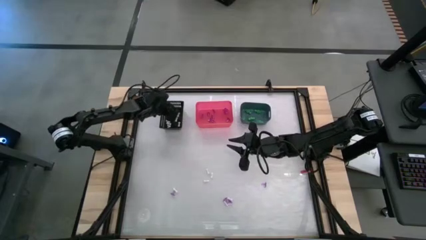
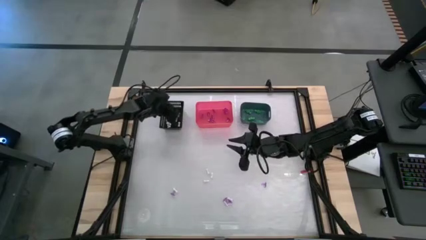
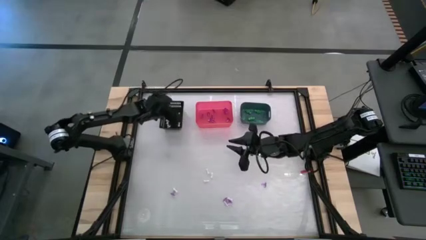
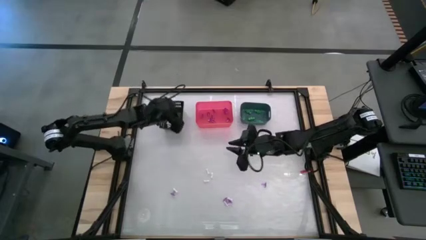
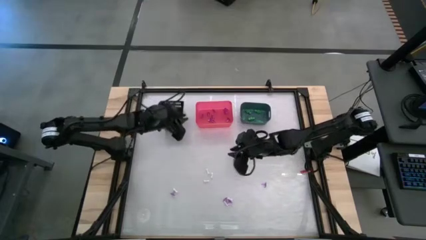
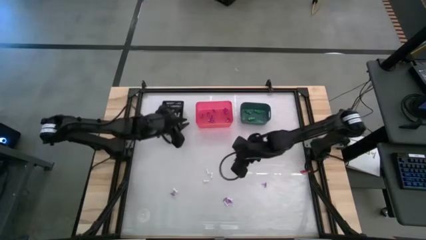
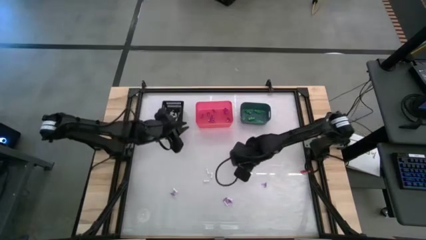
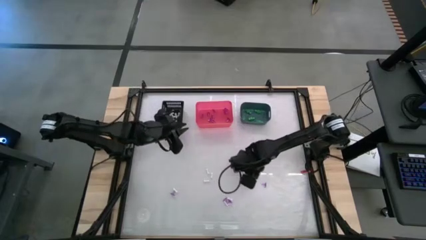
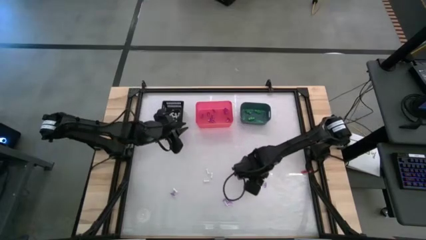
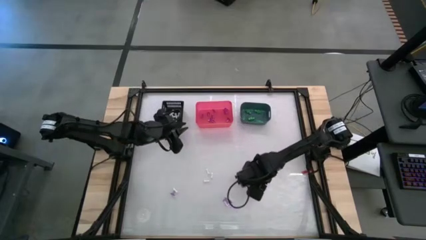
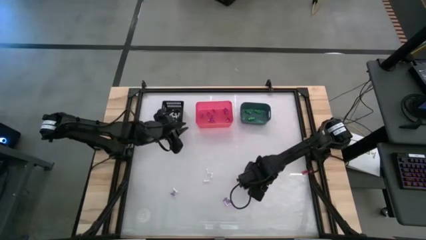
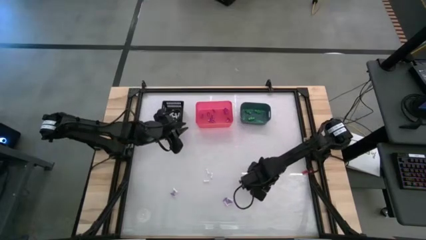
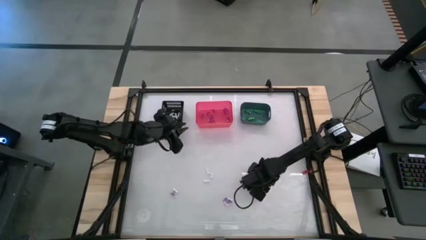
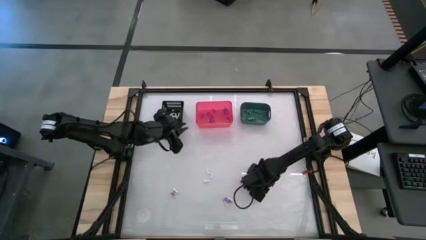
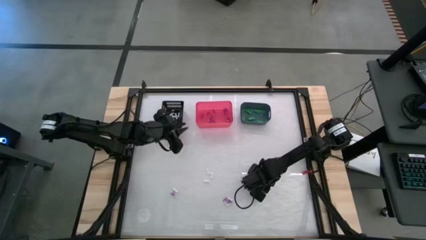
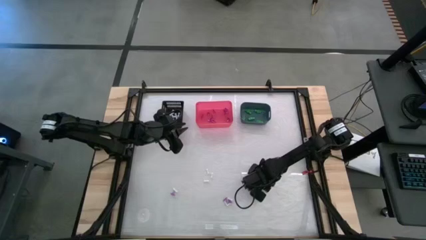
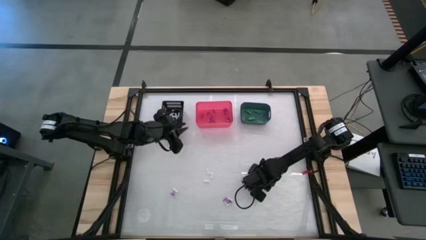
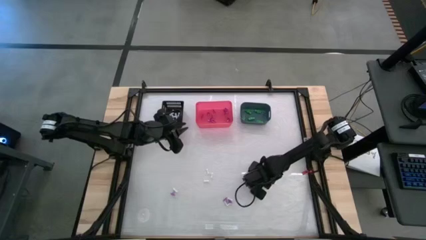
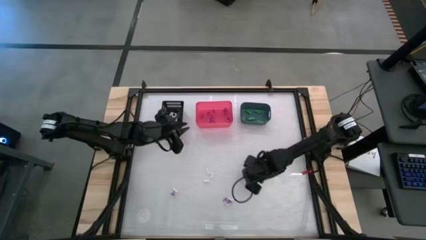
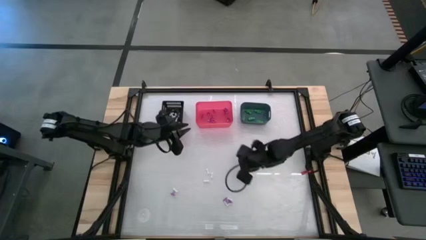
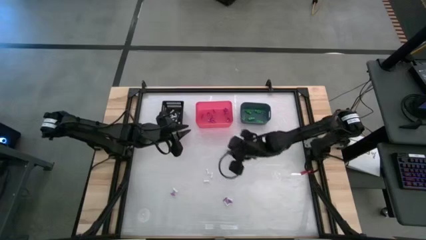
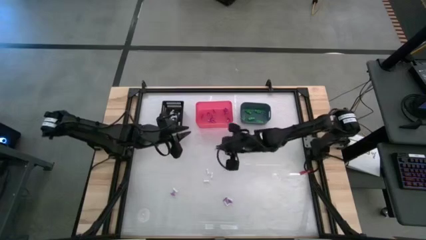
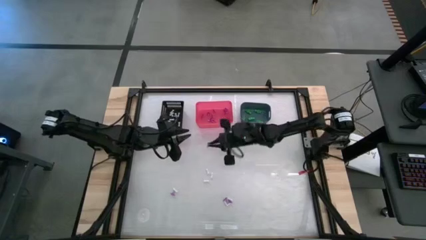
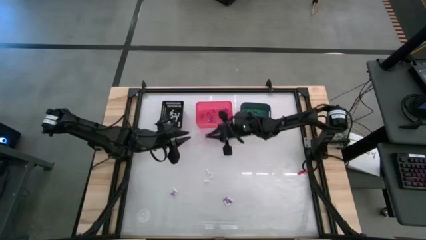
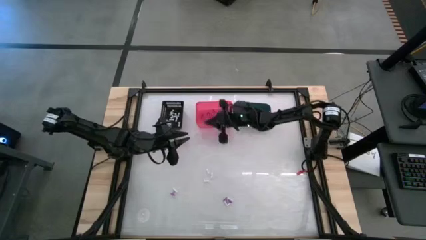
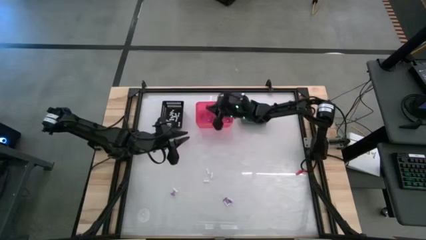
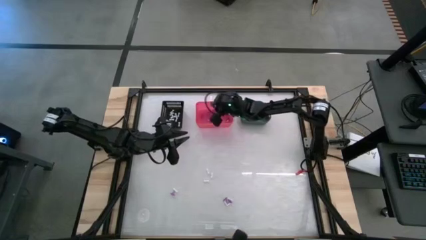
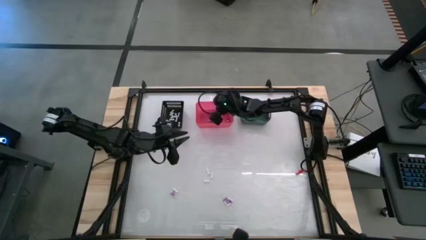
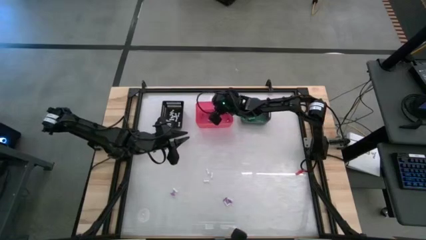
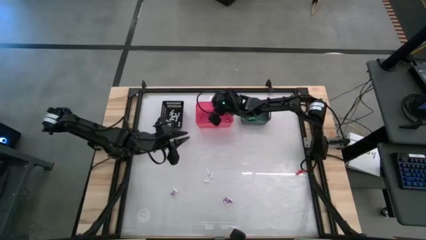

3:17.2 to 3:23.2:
Task: Sort Halloween decoration
Put the purple hat toy into the pink bin

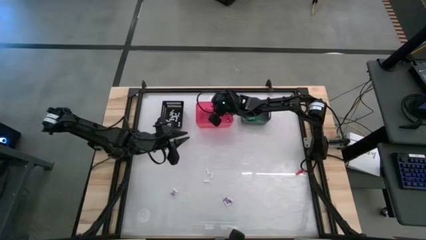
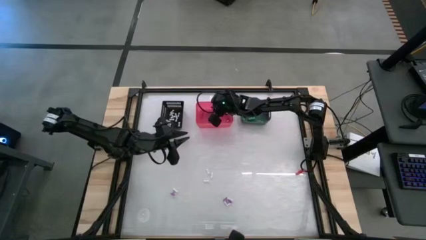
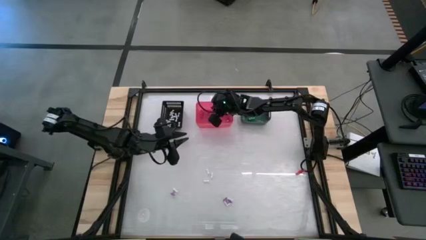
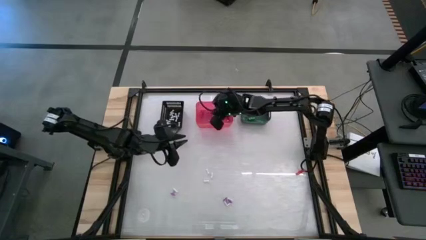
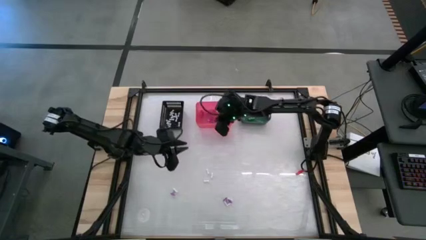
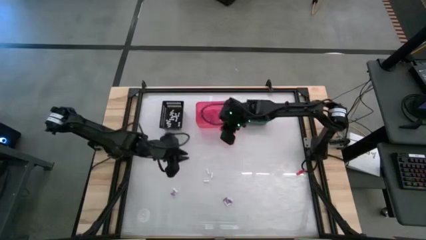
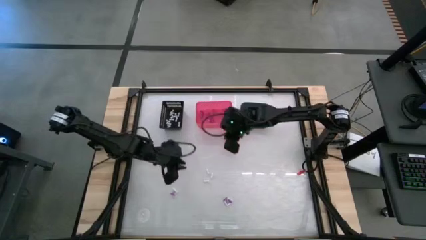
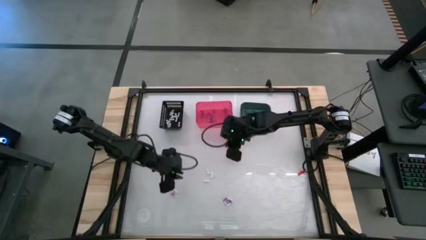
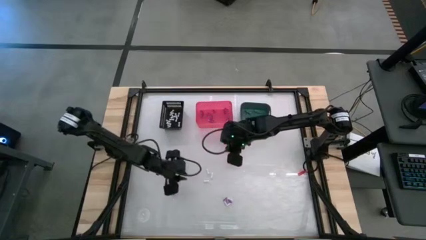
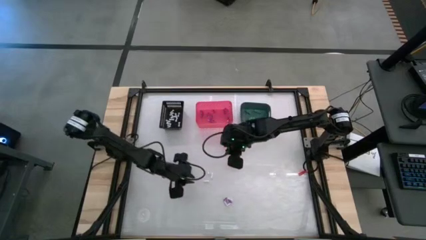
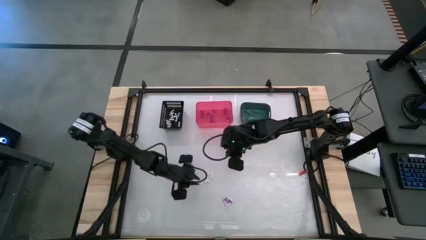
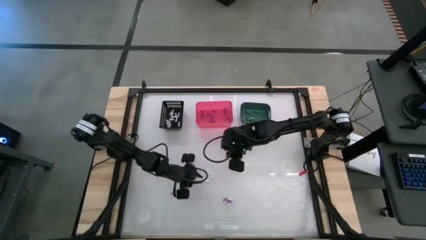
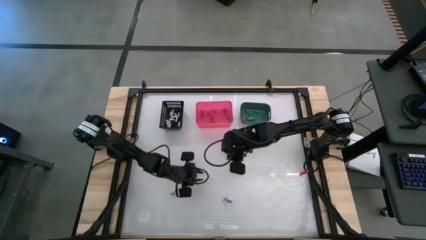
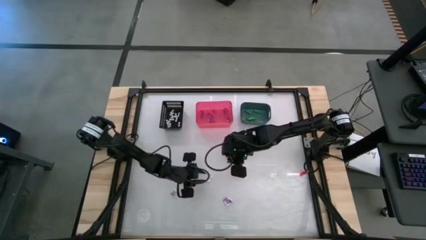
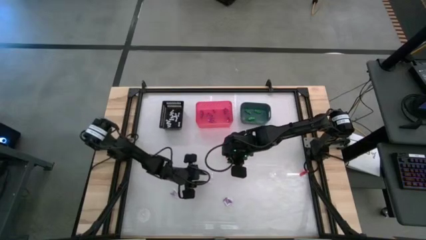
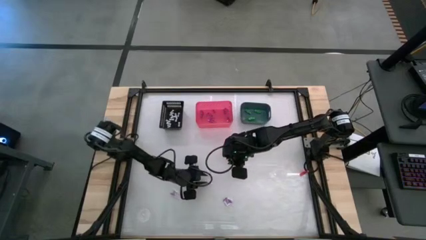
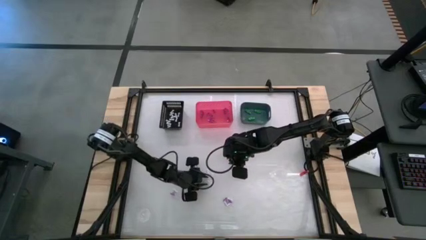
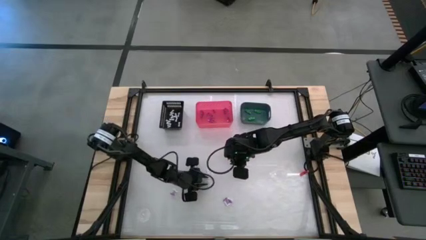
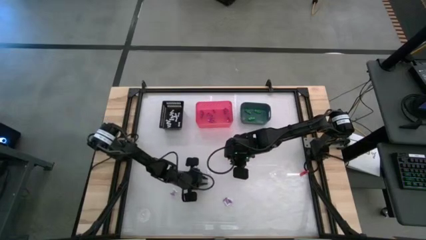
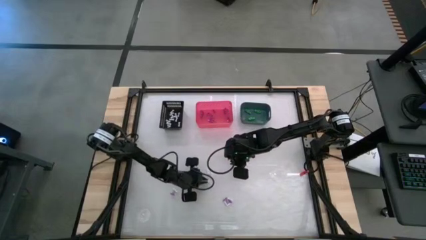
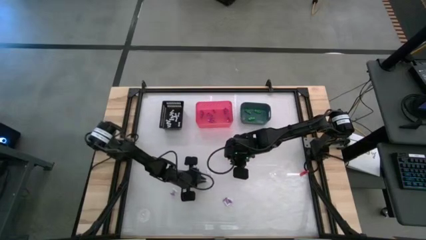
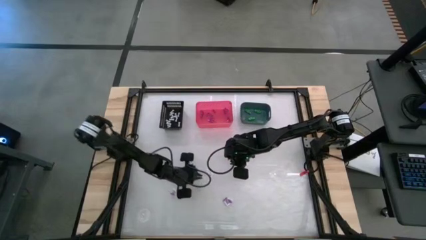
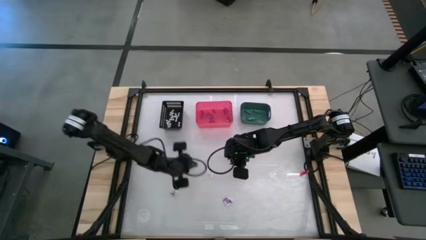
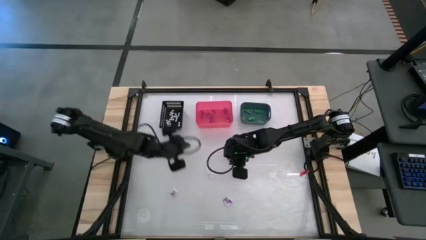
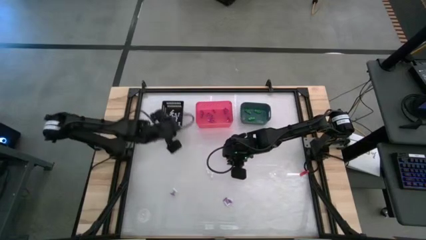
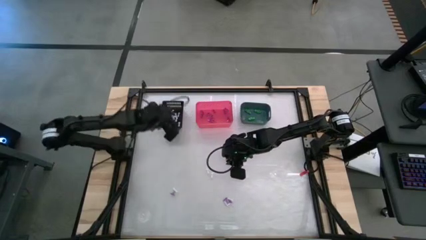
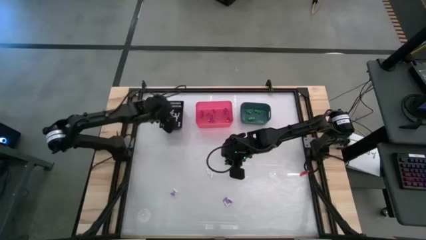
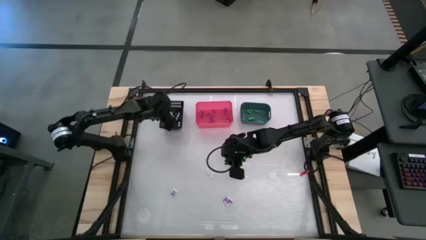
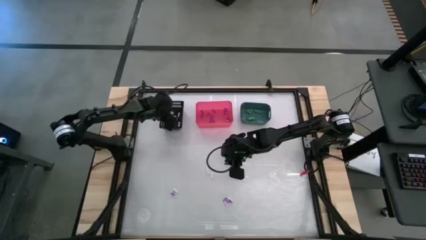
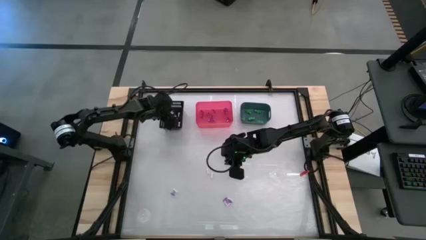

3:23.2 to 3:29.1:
Put the white bone toy into the black bin

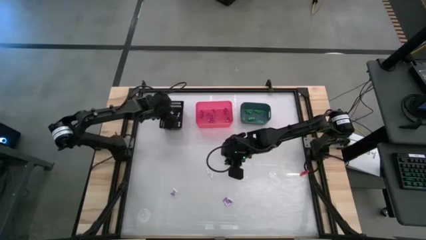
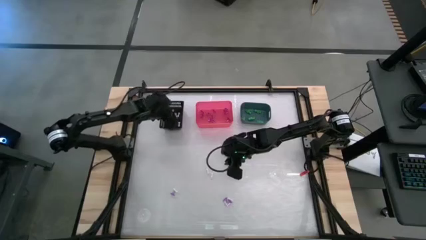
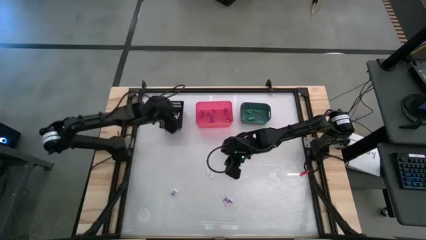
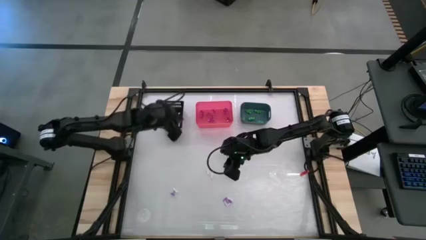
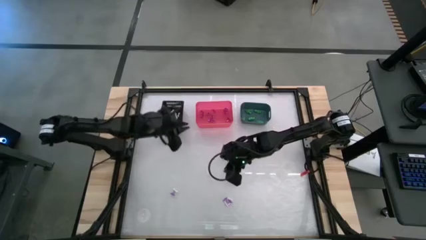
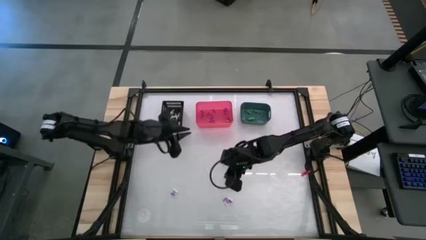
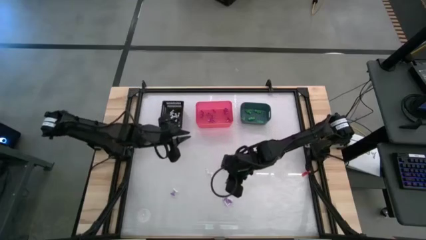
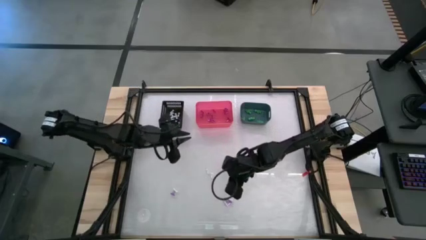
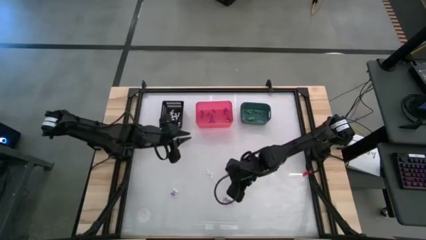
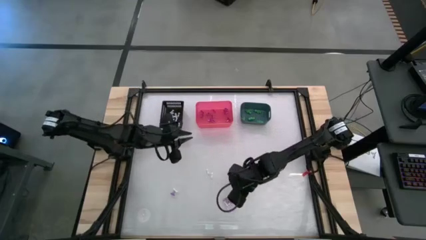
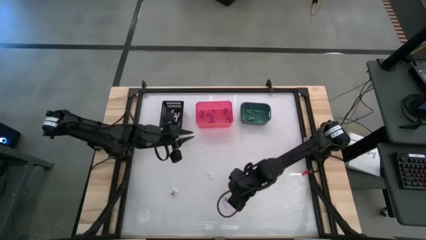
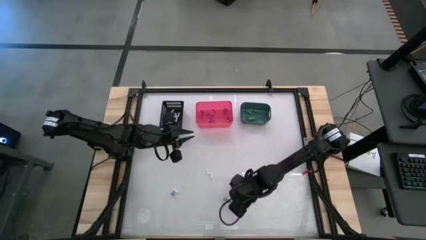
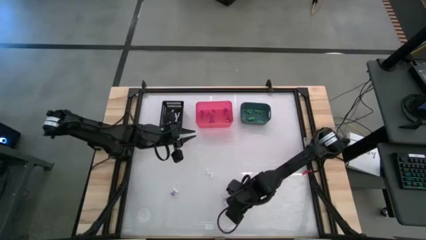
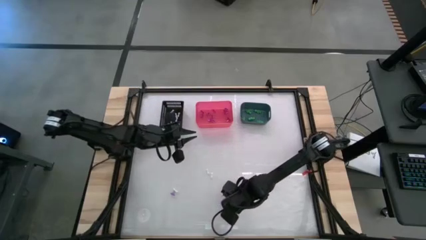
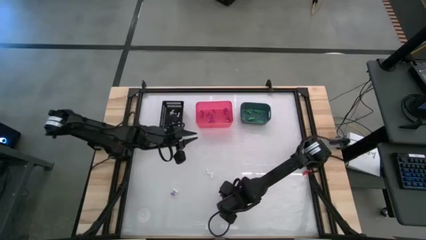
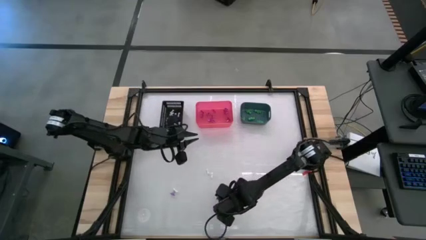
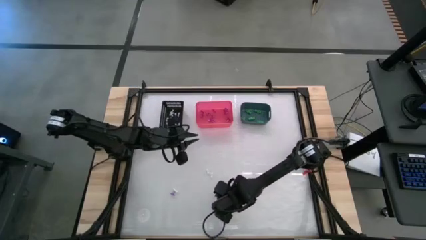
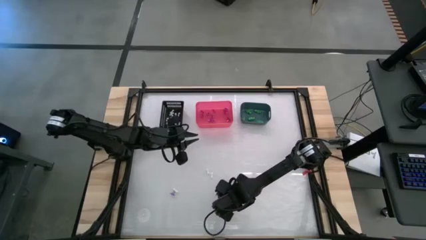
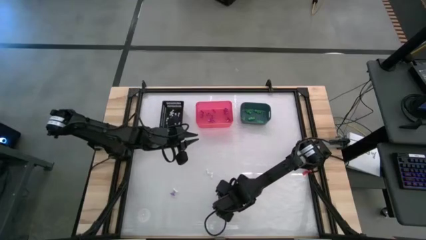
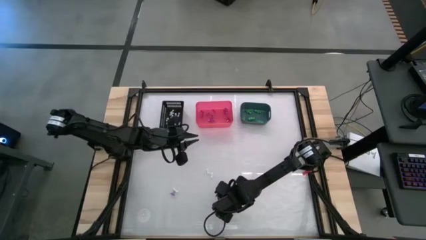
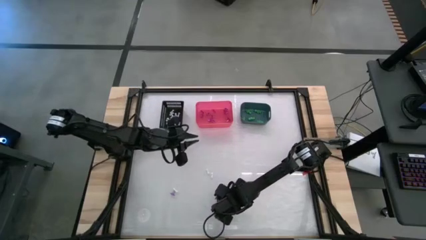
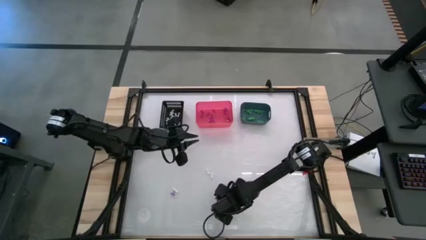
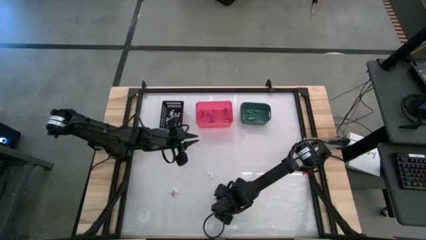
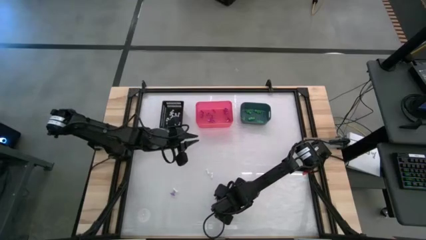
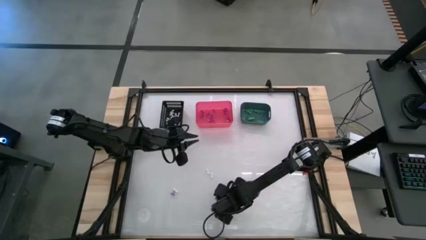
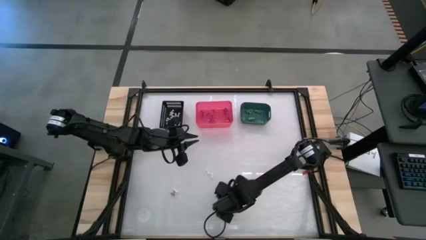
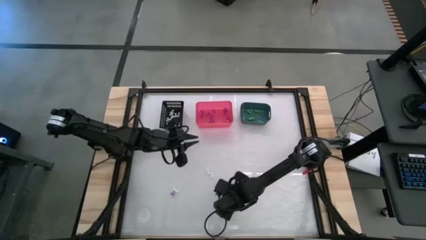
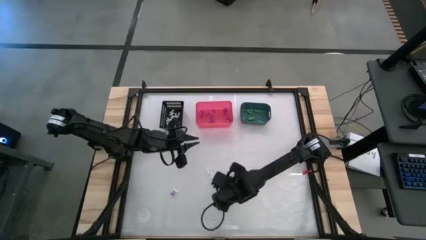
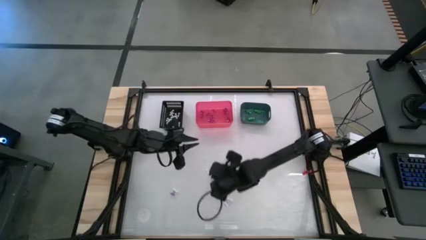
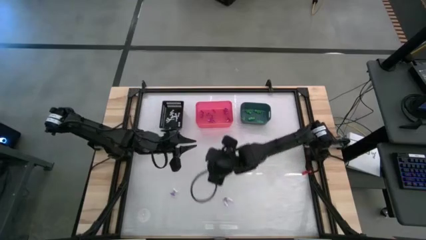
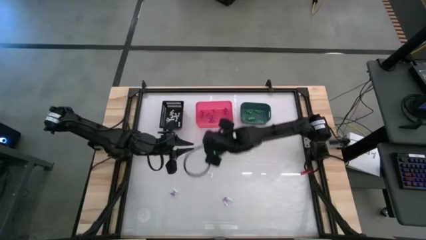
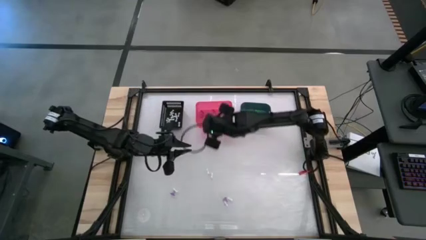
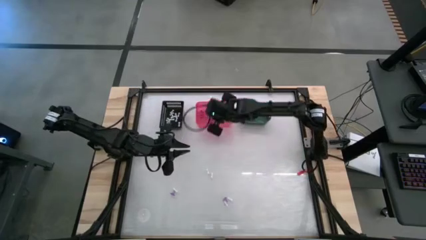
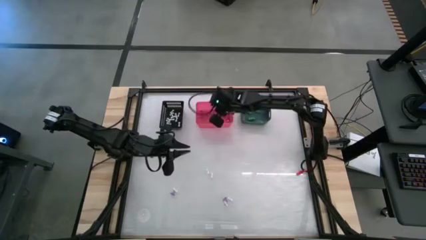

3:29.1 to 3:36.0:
Put the purple hat toy into the pink bin
